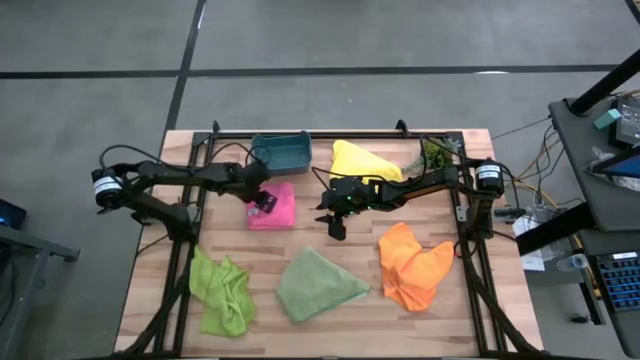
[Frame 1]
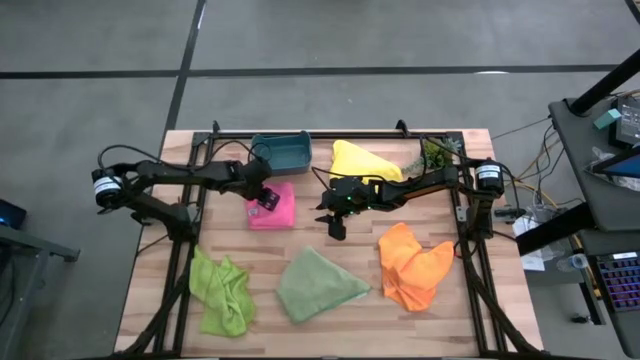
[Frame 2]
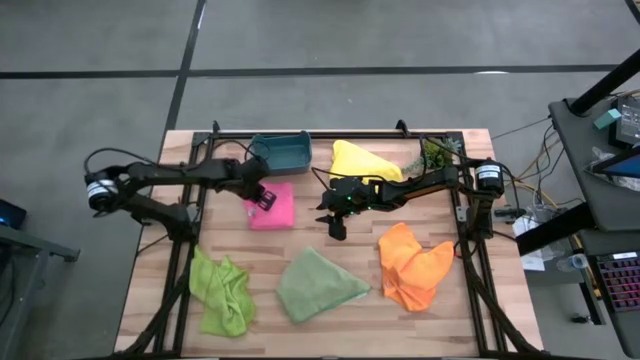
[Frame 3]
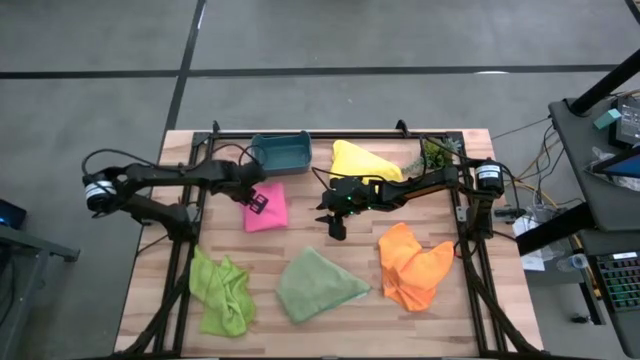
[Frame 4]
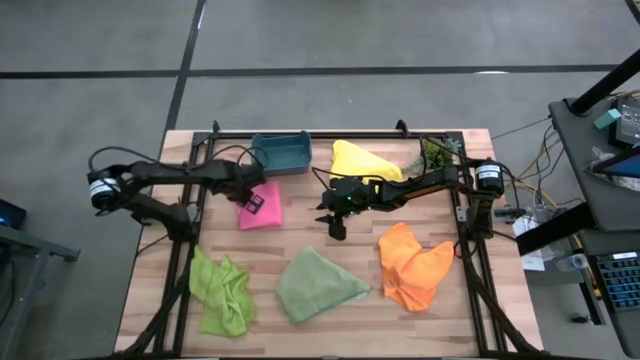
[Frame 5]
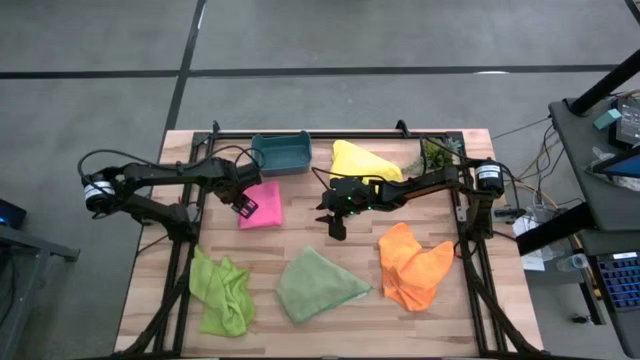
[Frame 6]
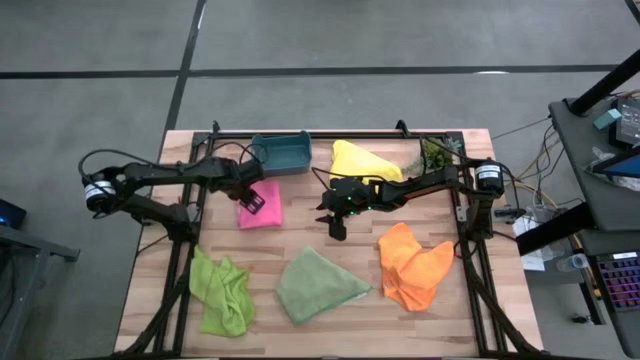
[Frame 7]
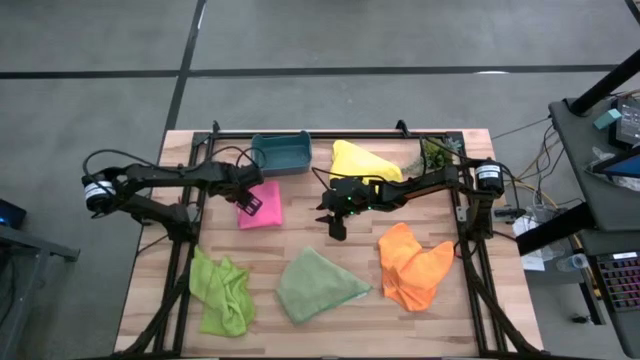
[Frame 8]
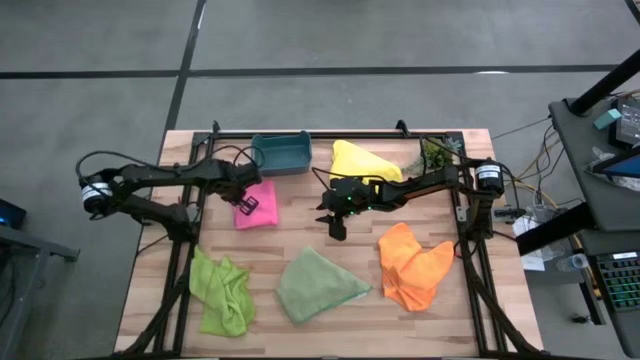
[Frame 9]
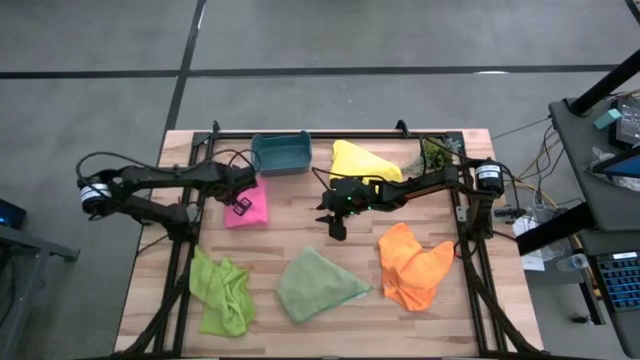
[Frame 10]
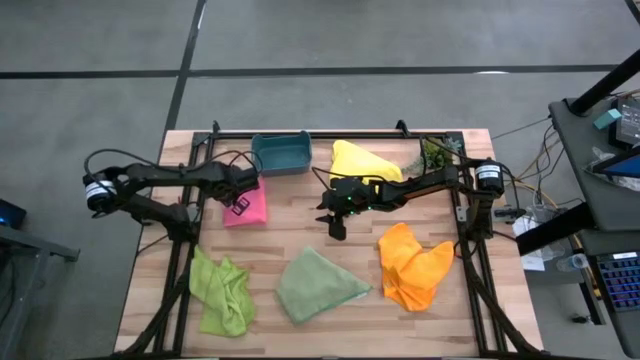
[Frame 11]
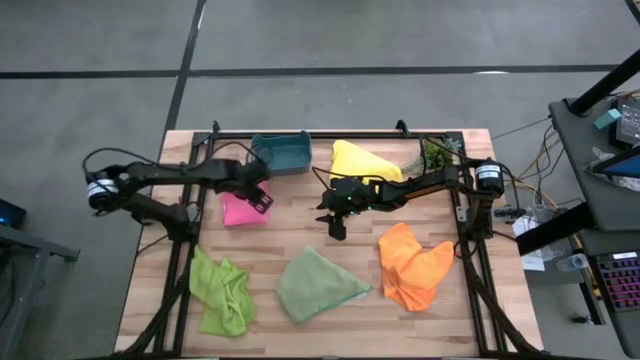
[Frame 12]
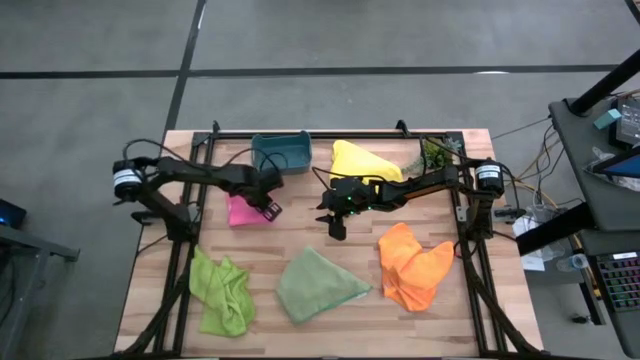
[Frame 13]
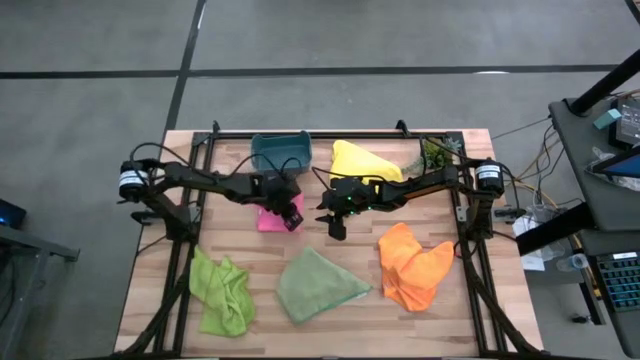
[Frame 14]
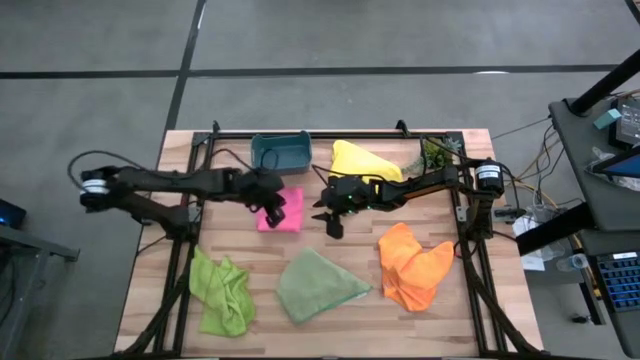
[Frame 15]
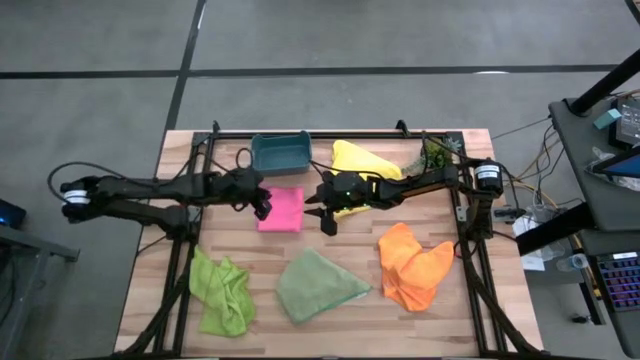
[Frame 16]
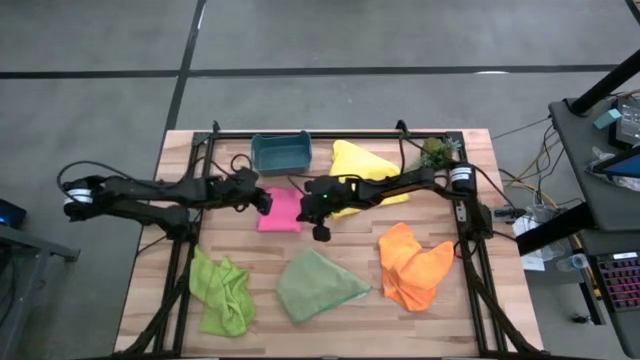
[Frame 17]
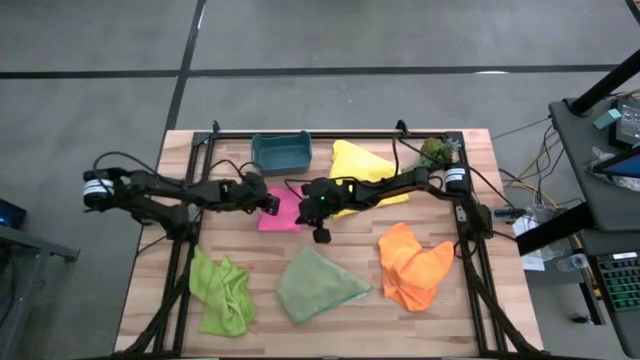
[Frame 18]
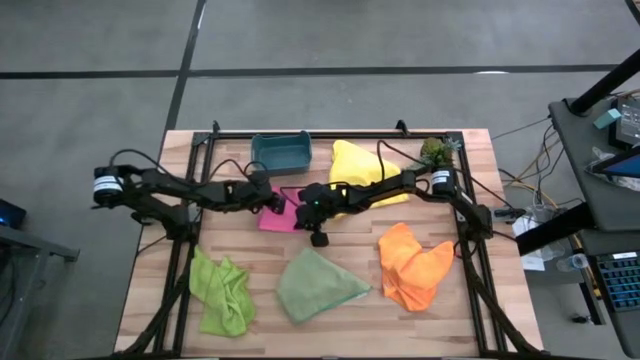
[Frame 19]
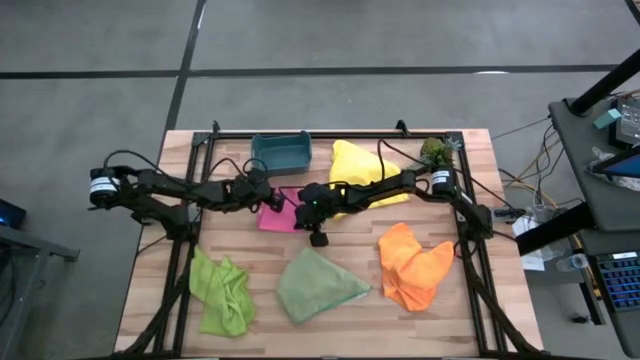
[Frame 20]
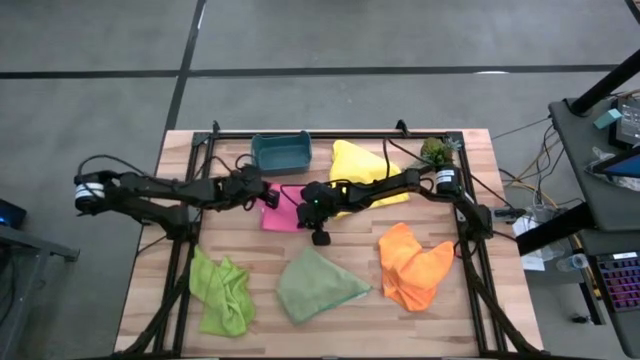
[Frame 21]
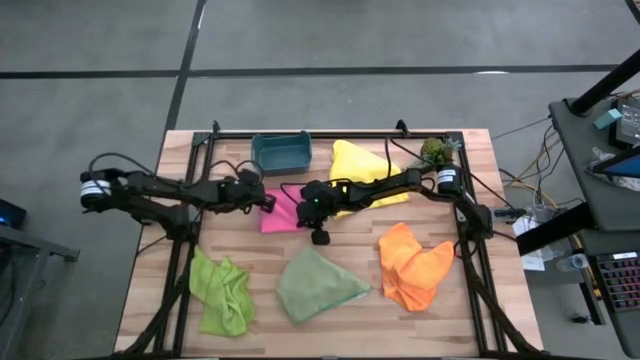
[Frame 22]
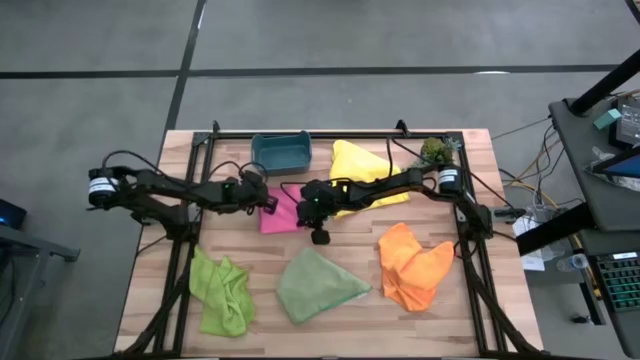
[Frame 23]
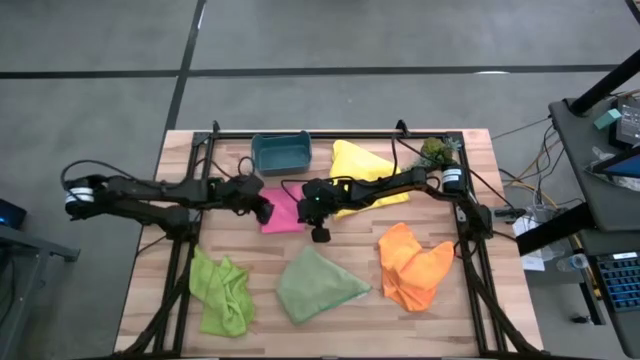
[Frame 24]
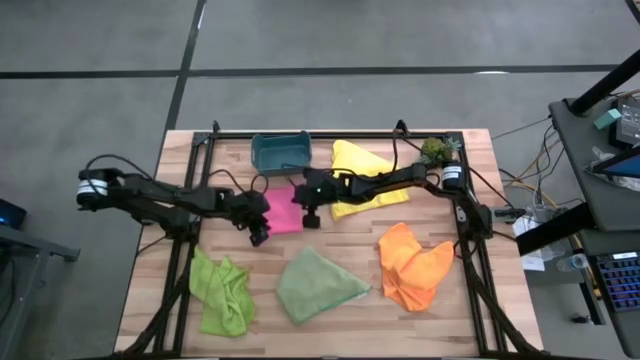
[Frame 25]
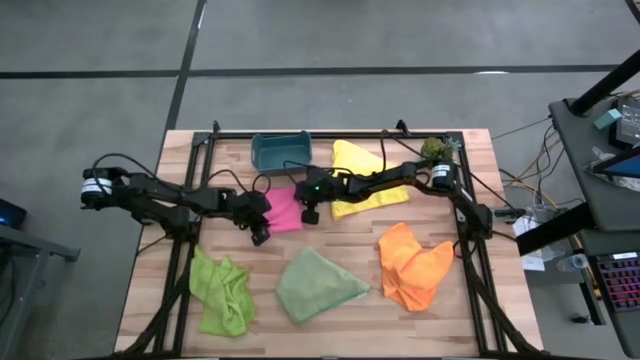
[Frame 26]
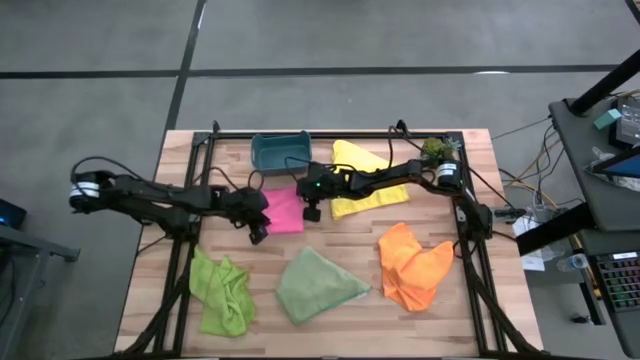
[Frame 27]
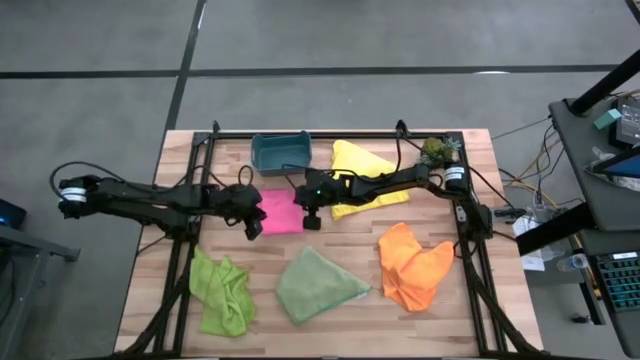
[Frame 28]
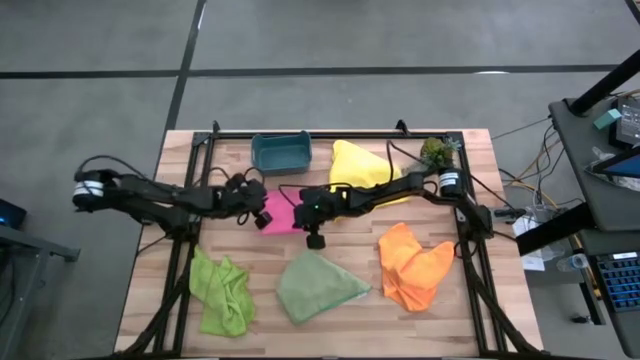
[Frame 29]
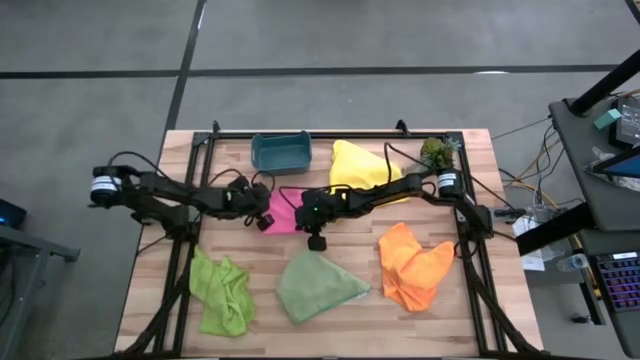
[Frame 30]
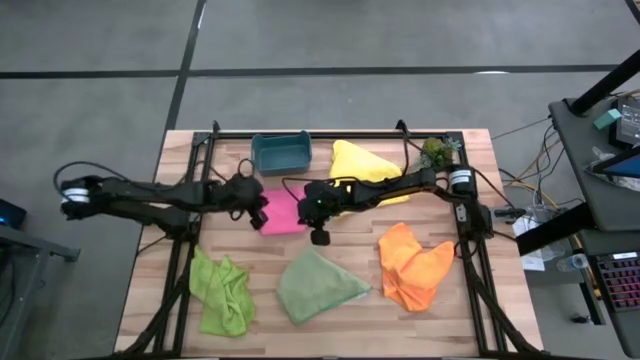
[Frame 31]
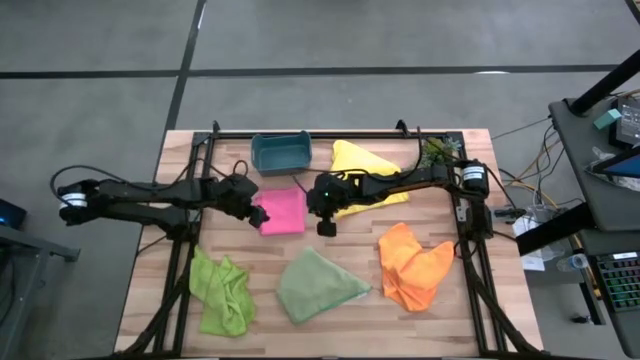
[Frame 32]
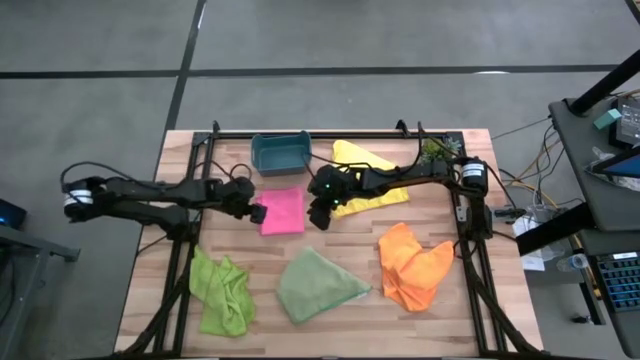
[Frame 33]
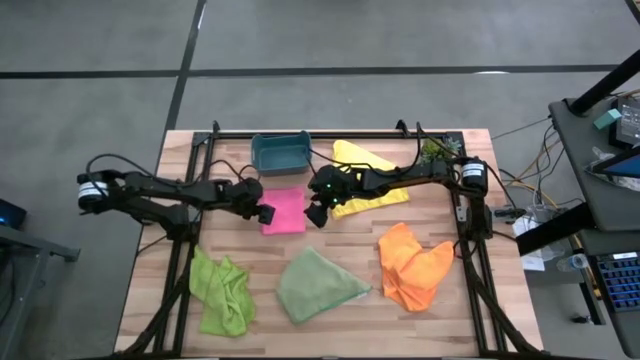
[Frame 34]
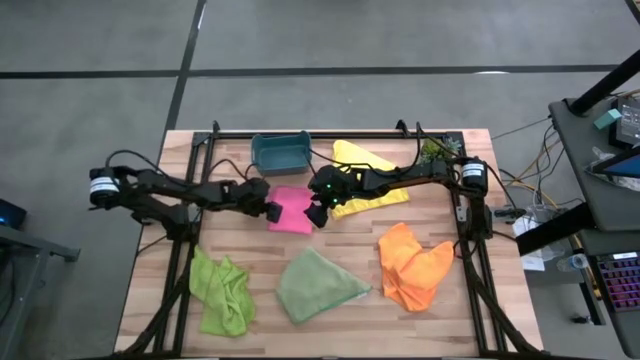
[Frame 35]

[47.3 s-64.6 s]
Task: Fold microfiber towels
Fold the pink microfiber towel

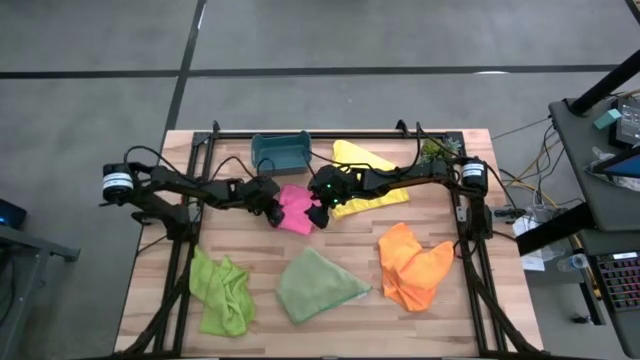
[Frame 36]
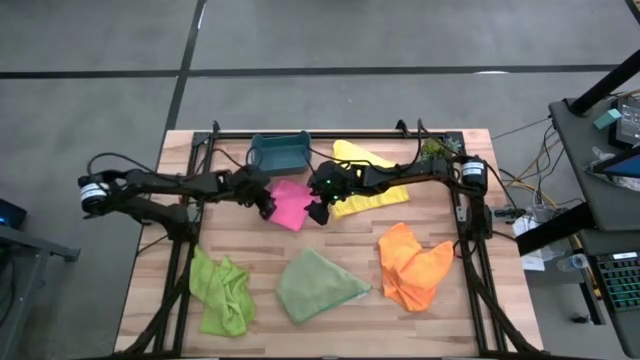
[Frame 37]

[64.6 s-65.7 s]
Fold the pink microfiber towel

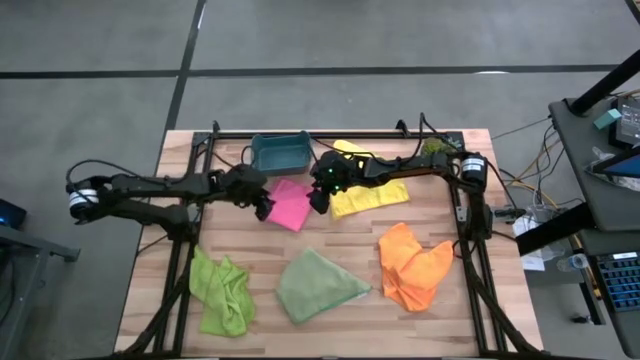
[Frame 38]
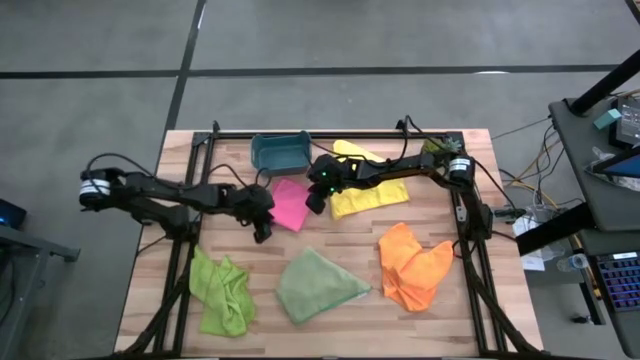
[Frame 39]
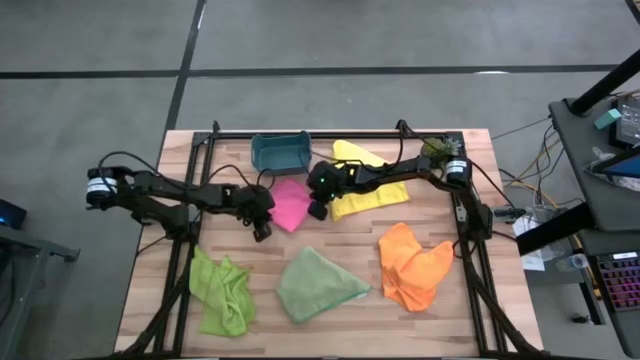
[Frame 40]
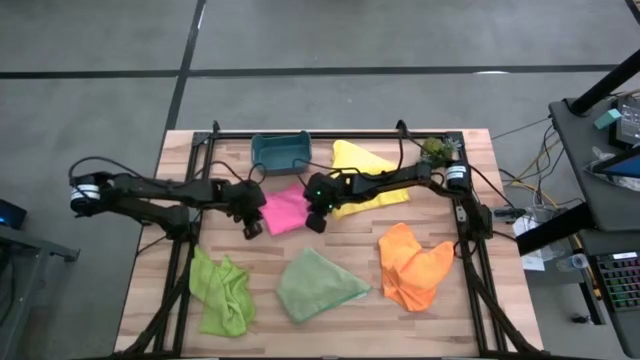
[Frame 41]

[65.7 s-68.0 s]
Fold the pink microfiber towel

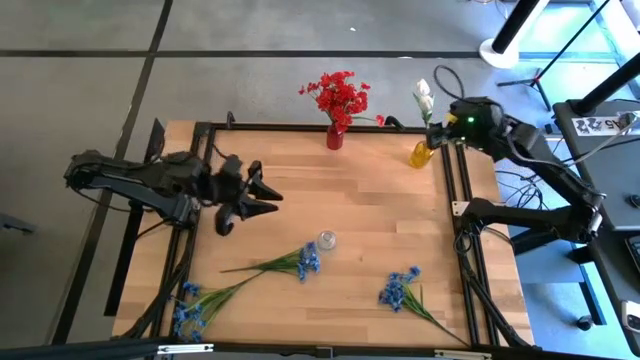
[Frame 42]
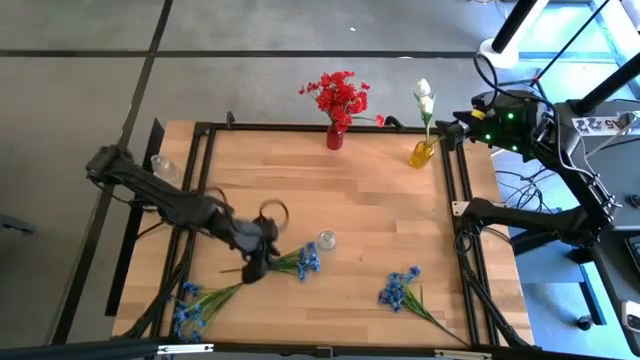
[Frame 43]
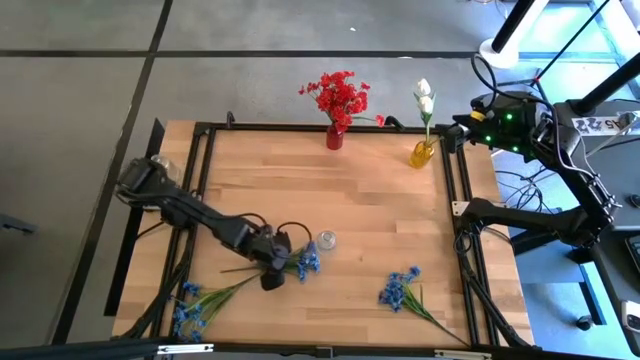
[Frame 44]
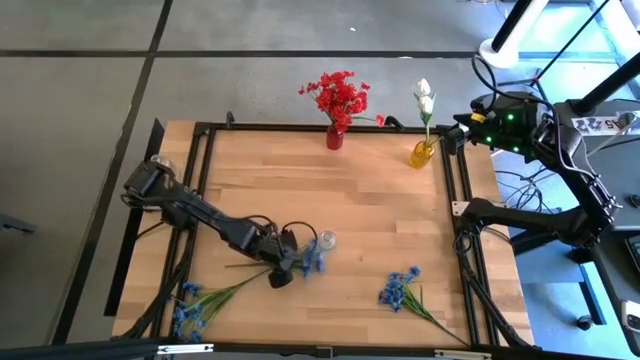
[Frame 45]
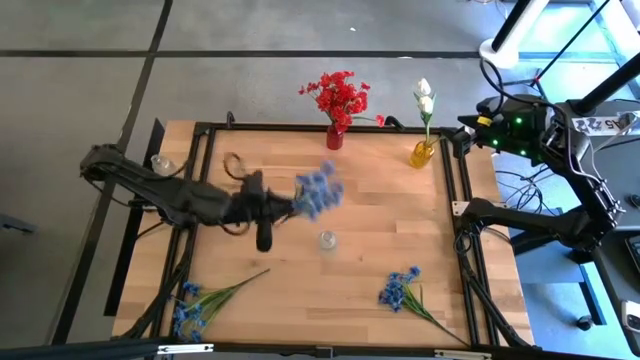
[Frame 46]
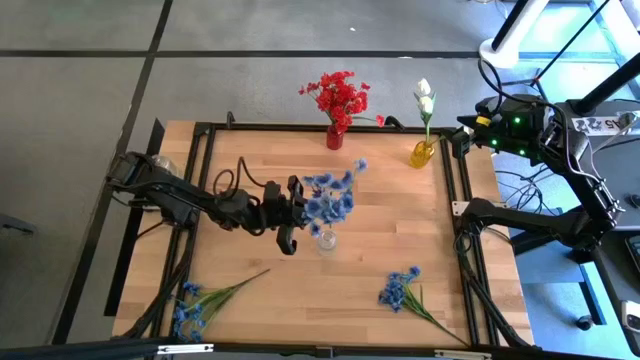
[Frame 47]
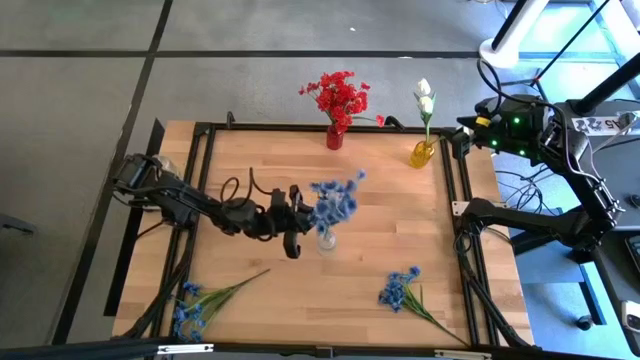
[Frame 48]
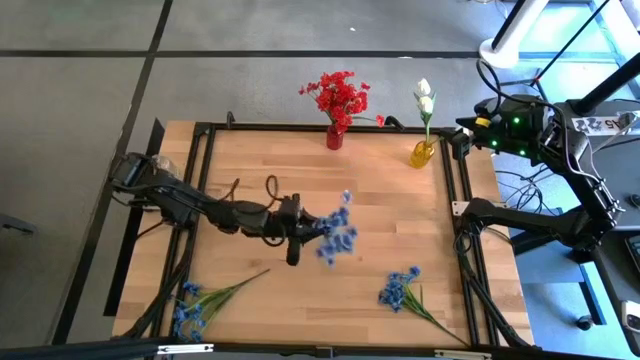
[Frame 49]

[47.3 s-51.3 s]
Task: Sort flowers into vase by color
Put the middle blue flower into the transparent vase
